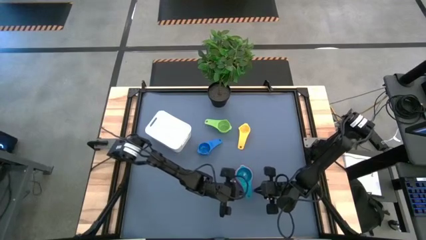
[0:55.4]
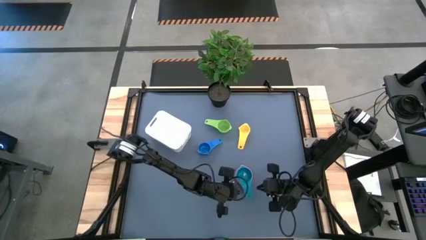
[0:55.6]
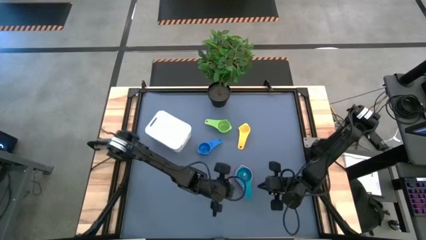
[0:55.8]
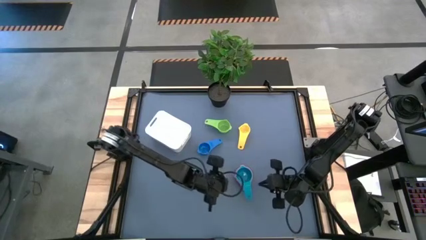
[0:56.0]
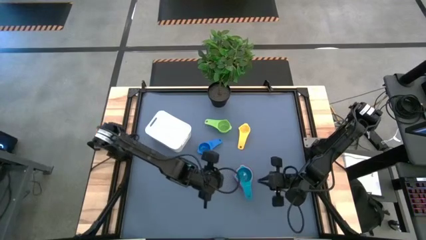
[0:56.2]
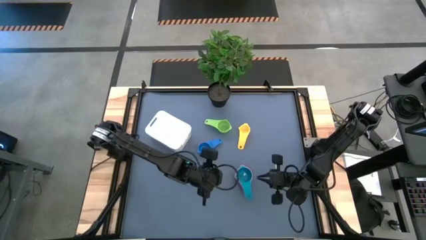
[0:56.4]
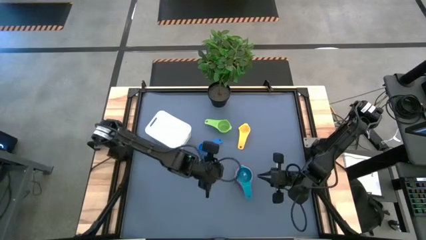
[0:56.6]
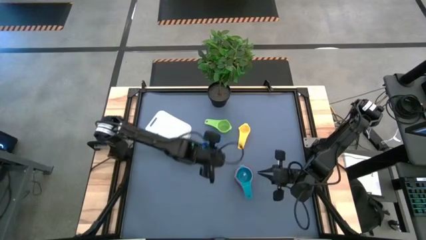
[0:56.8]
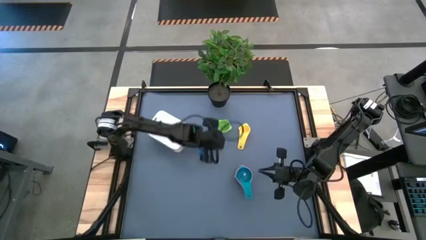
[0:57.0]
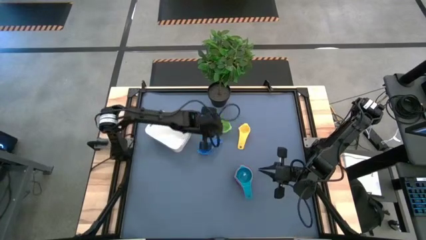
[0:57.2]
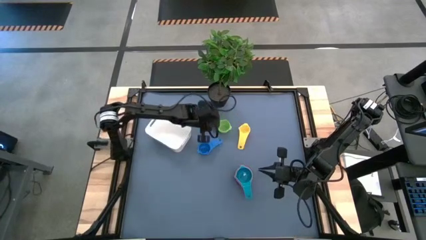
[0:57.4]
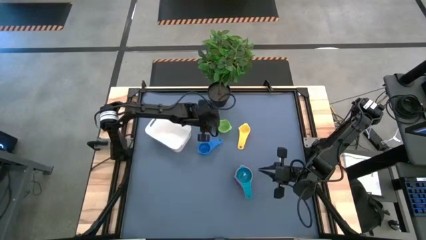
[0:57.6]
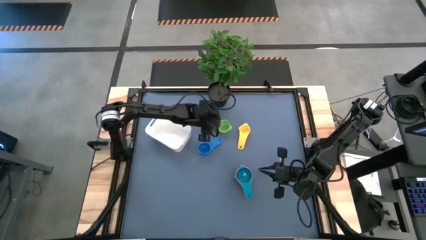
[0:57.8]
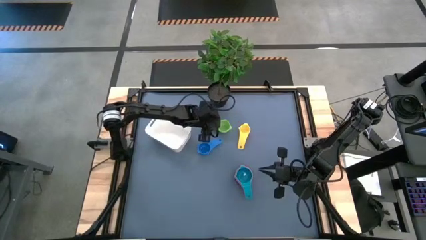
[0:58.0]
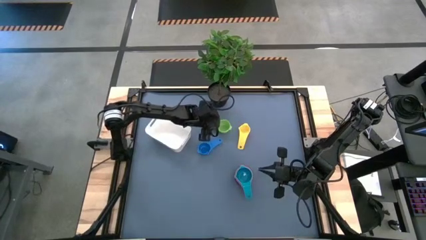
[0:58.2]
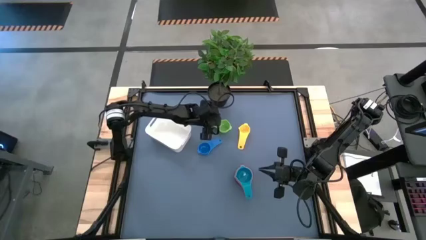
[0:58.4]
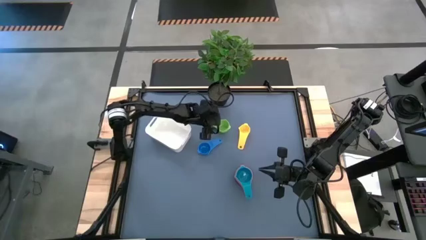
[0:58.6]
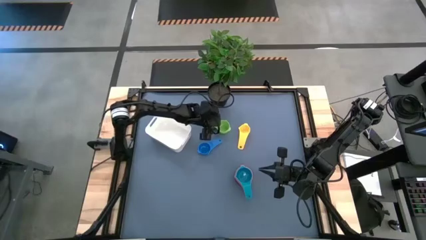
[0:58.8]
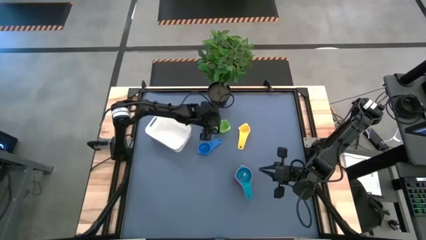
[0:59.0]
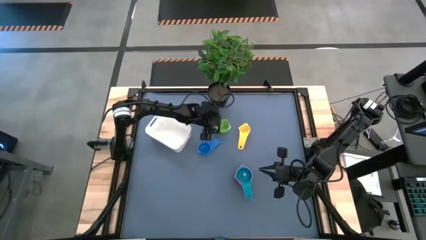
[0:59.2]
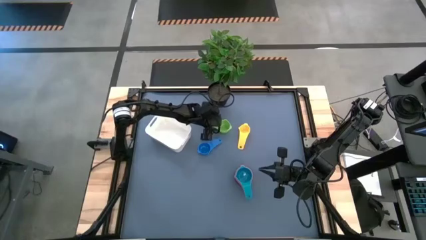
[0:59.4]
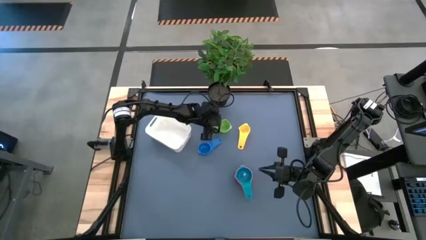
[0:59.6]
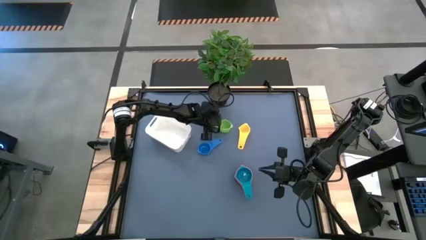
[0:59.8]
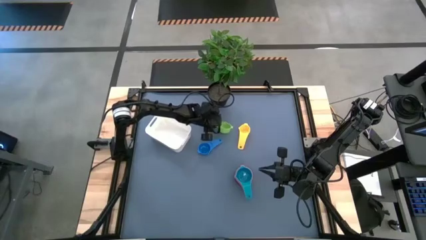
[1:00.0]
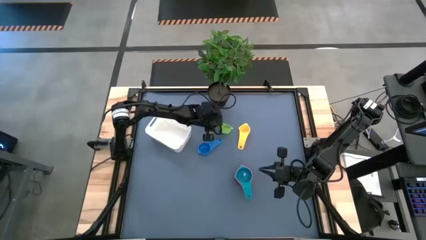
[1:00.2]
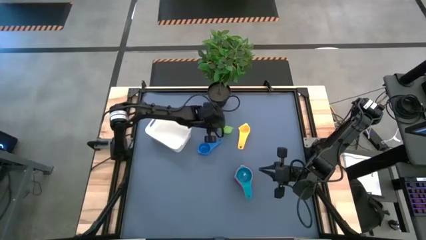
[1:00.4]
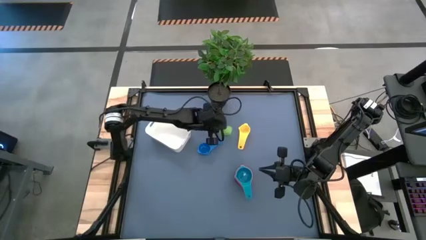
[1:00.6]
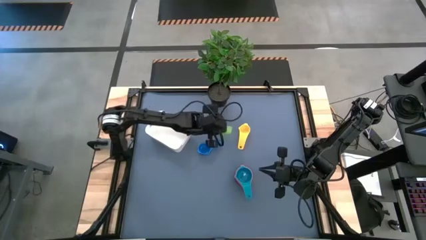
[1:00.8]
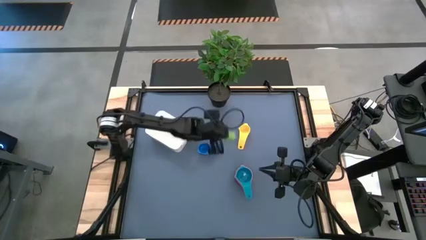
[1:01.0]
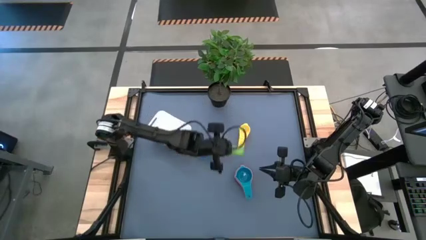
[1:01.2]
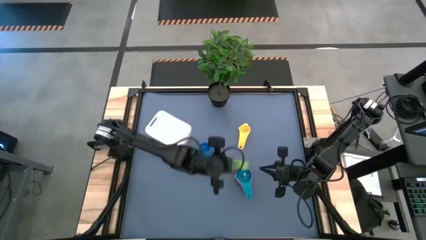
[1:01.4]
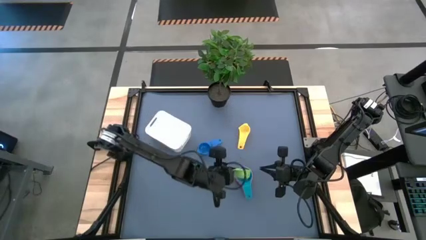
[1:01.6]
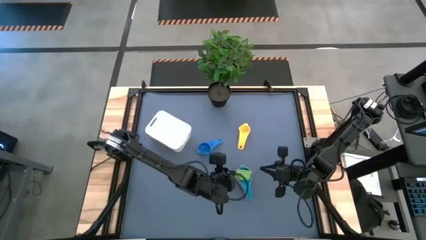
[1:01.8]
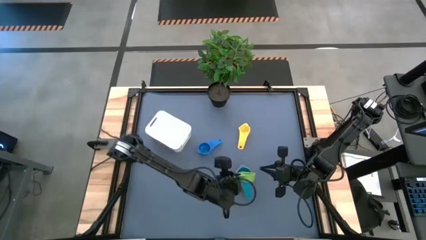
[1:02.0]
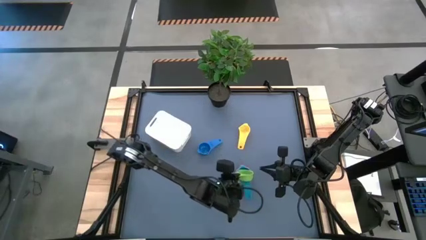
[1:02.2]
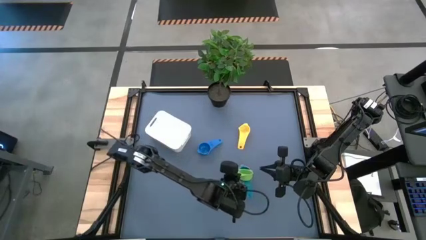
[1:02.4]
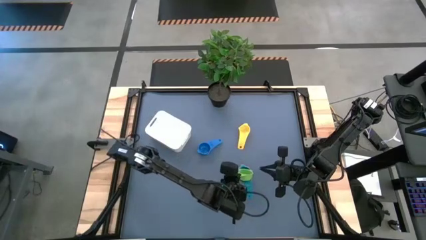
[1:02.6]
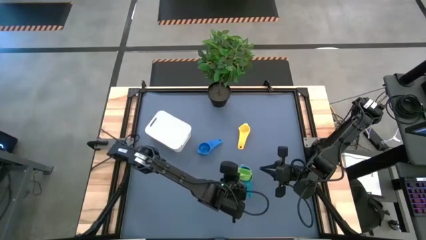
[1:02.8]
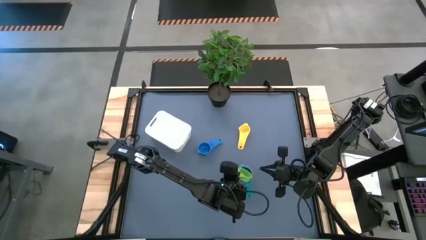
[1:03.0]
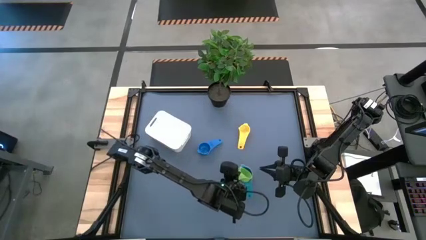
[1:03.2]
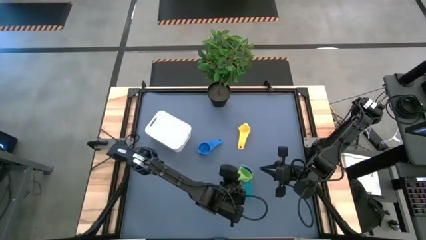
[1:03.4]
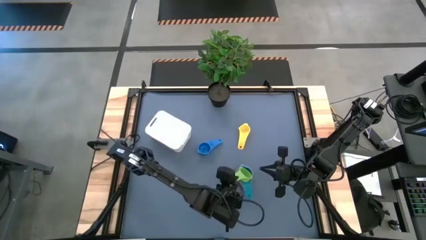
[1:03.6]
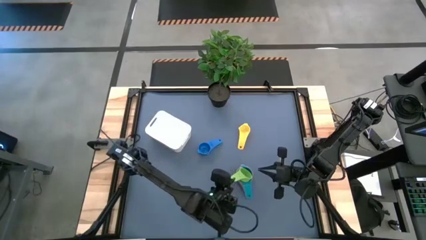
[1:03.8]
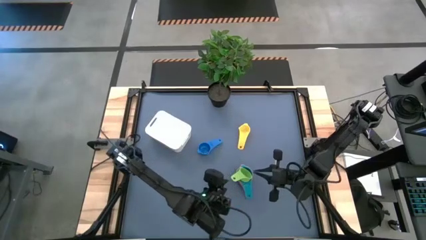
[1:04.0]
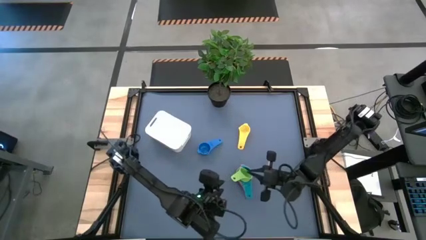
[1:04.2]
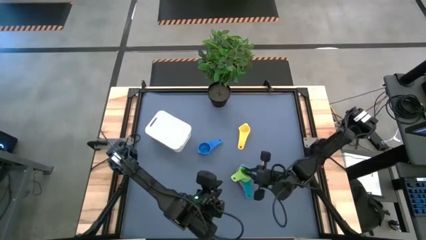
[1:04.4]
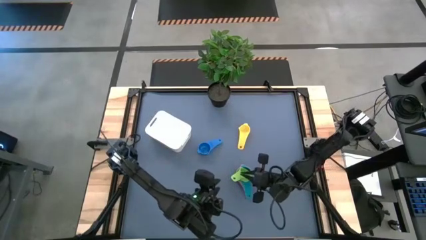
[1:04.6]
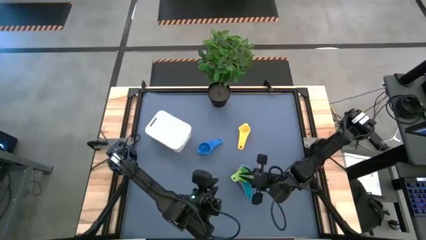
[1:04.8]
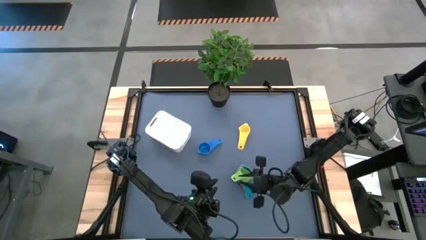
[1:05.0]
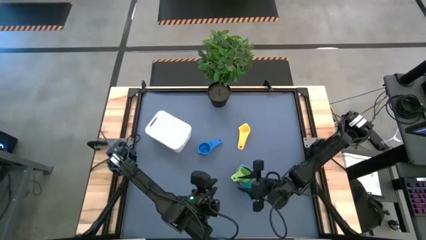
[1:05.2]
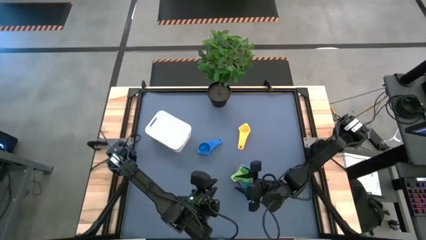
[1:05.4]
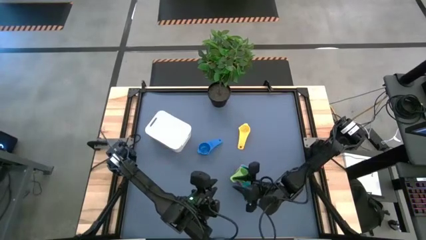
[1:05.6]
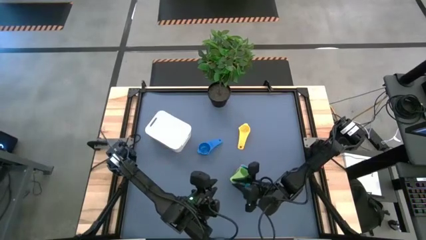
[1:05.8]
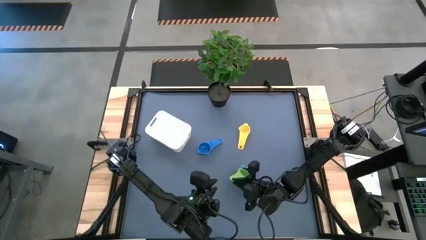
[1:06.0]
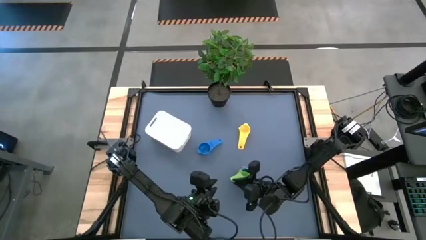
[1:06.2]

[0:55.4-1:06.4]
Task: Nest measuring cups in basket
Stack the light green measuring cup on the light blue measuring cup

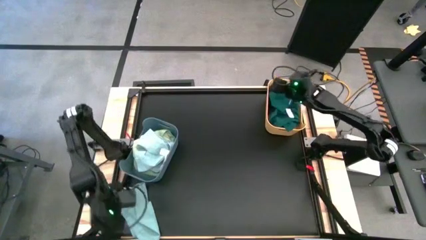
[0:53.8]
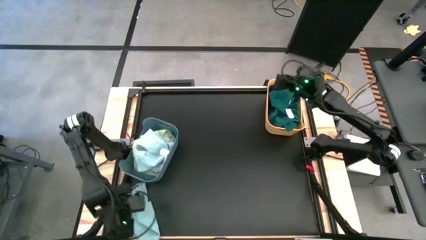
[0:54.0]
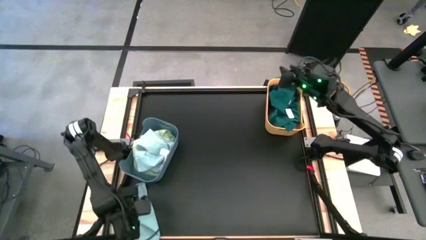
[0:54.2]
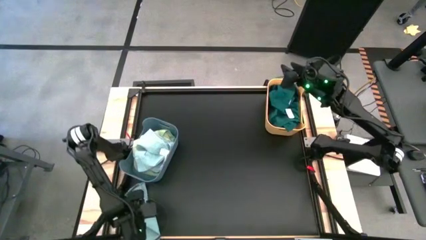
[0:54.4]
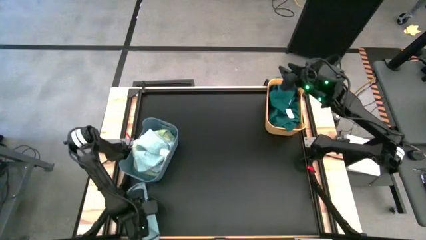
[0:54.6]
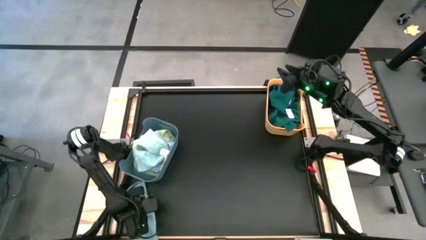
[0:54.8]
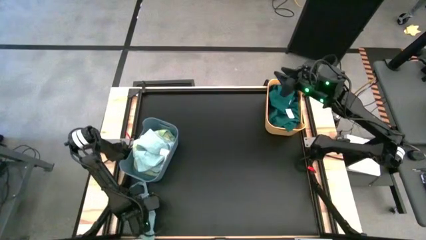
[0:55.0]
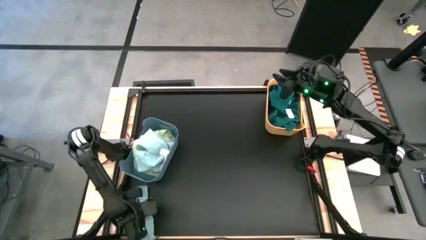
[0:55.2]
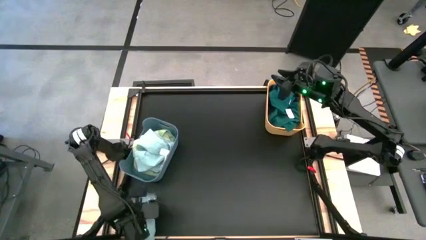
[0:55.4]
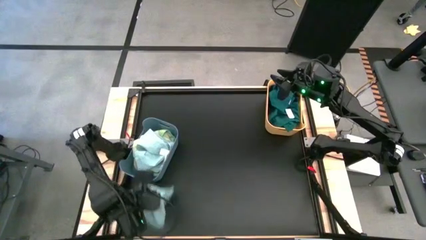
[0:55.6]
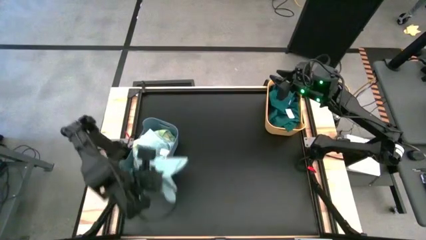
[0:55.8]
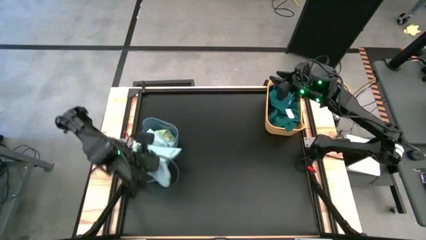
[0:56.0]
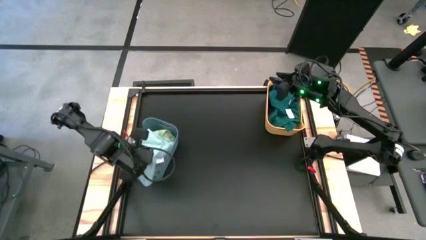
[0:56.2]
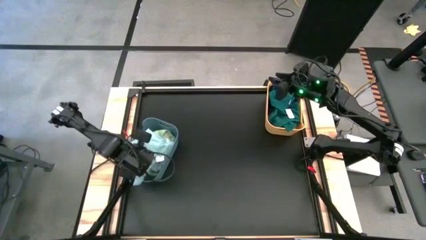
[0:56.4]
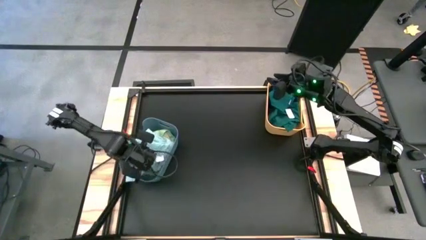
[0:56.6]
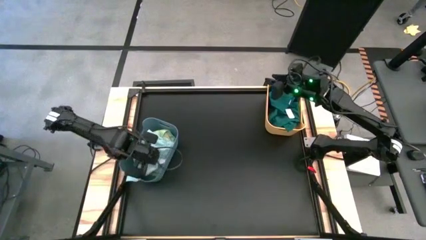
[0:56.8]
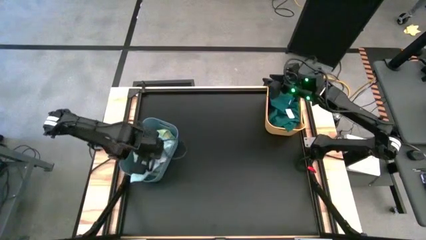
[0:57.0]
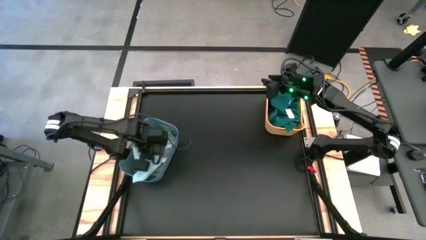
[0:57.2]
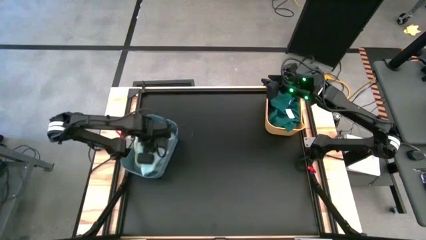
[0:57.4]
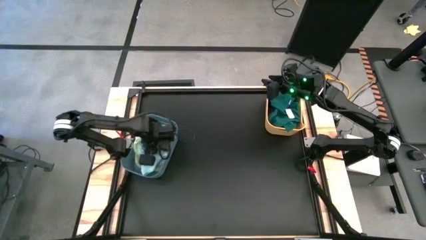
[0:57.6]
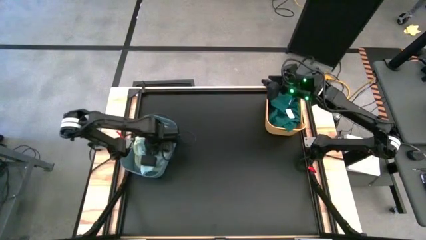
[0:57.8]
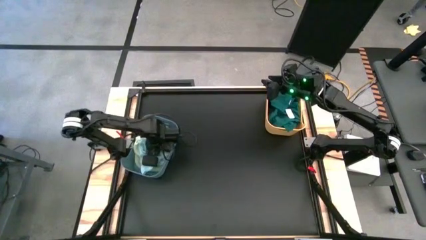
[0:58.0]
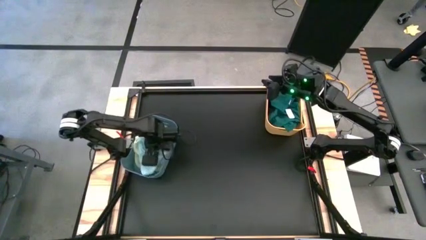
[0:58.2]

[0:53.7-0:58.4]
Task: Sort towels by color in basket
Put the light blue towel into the blue bin
